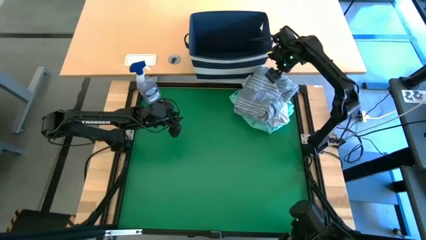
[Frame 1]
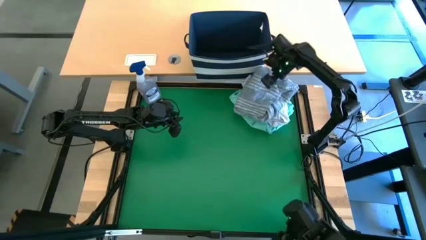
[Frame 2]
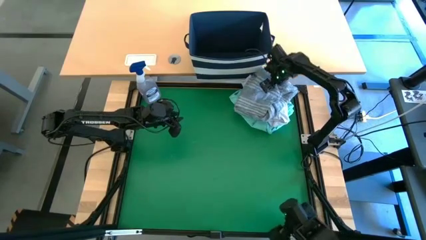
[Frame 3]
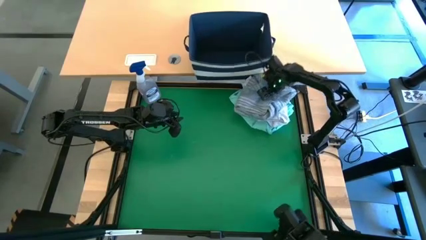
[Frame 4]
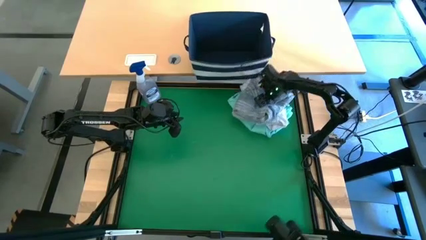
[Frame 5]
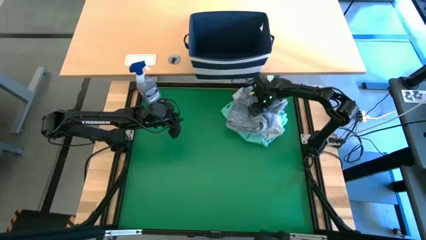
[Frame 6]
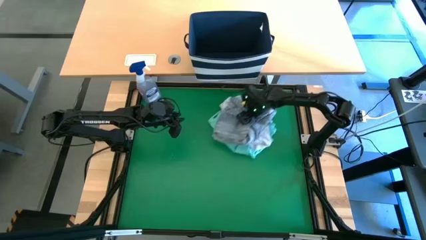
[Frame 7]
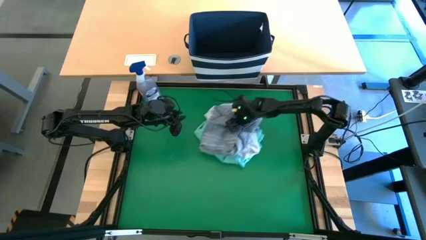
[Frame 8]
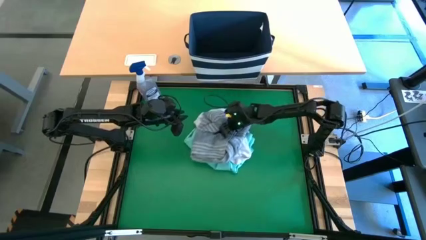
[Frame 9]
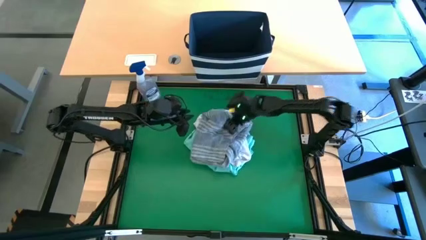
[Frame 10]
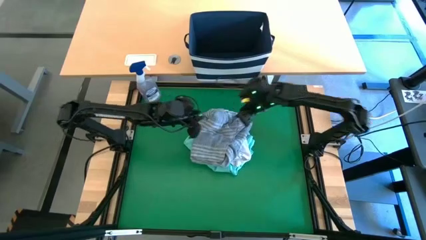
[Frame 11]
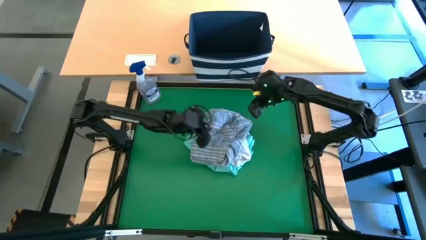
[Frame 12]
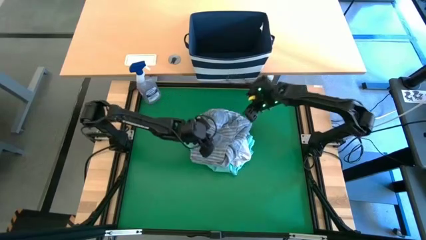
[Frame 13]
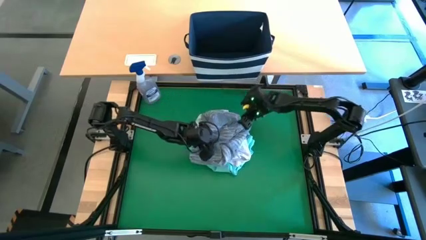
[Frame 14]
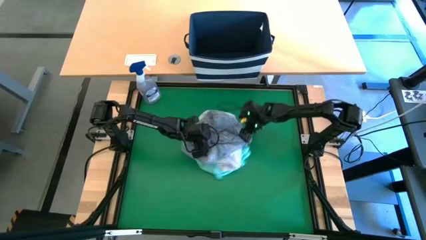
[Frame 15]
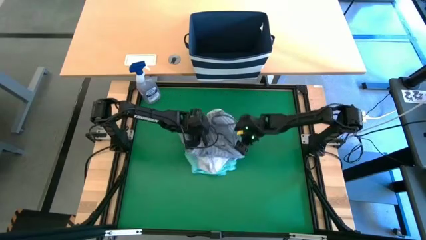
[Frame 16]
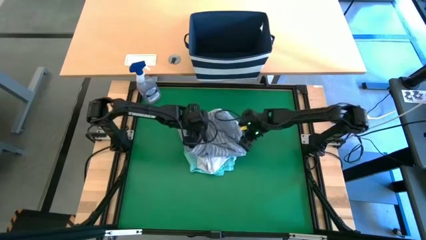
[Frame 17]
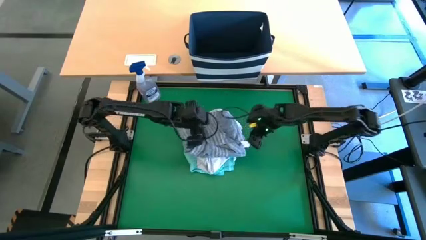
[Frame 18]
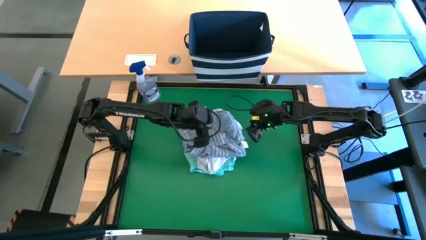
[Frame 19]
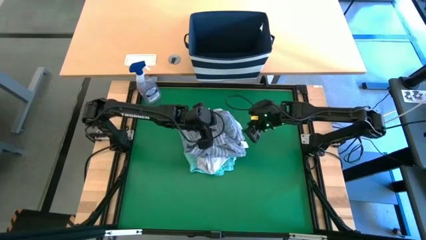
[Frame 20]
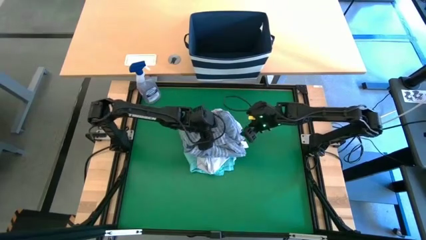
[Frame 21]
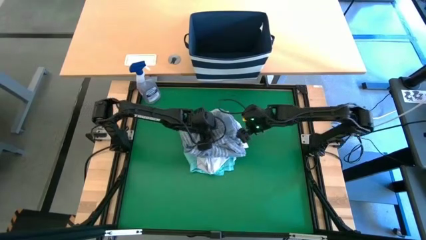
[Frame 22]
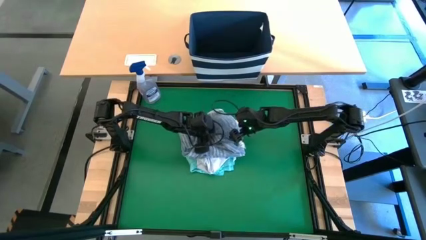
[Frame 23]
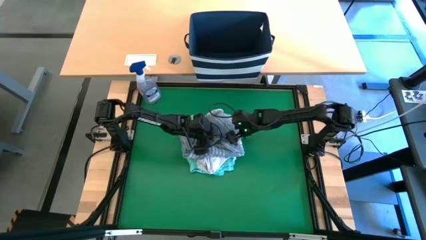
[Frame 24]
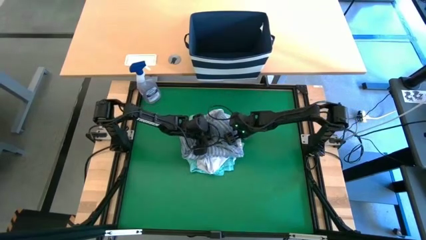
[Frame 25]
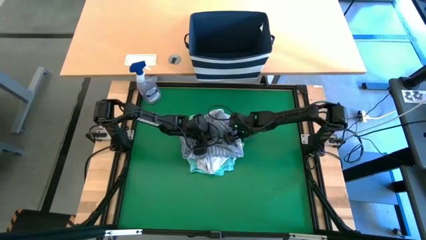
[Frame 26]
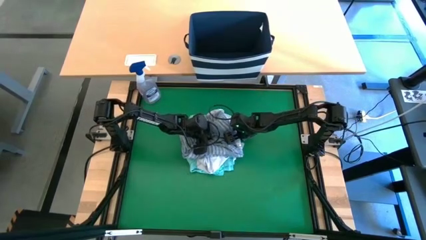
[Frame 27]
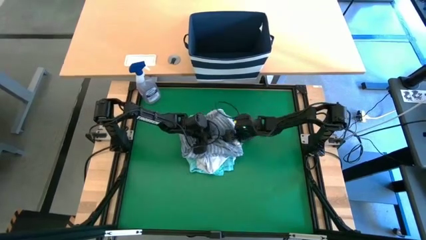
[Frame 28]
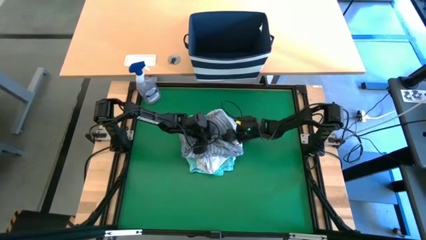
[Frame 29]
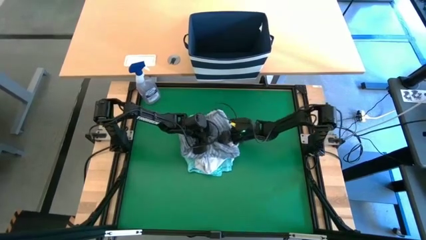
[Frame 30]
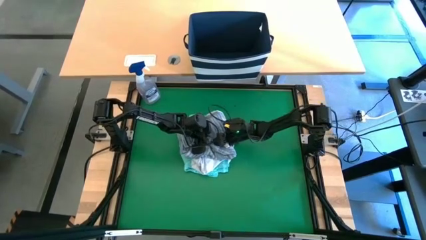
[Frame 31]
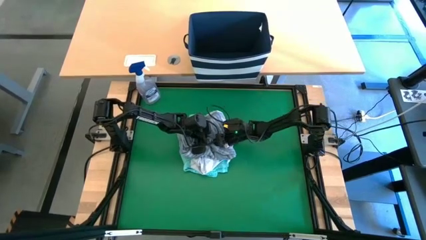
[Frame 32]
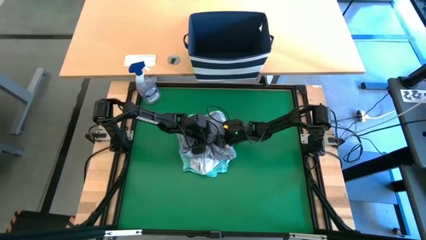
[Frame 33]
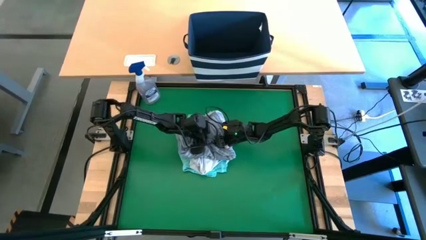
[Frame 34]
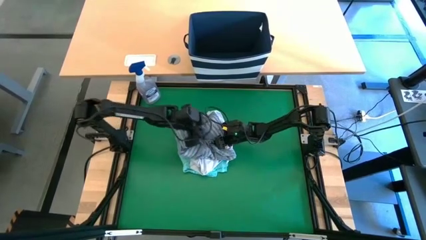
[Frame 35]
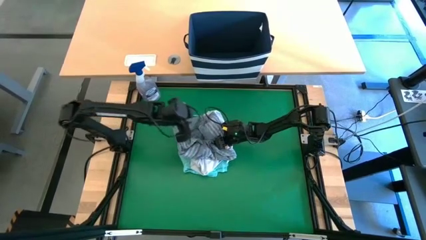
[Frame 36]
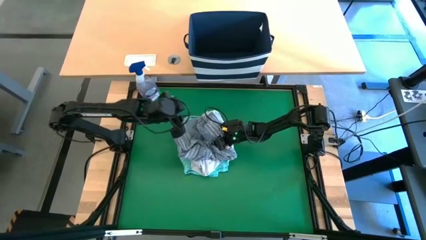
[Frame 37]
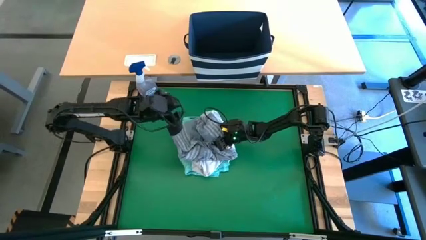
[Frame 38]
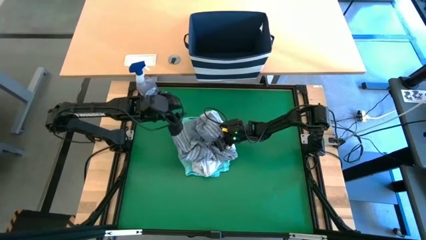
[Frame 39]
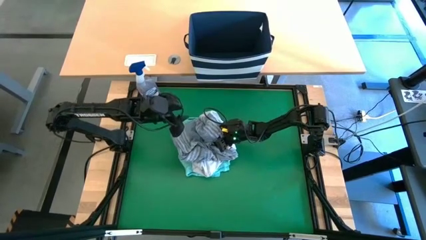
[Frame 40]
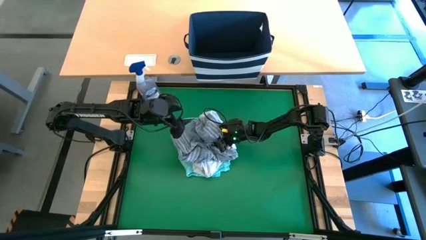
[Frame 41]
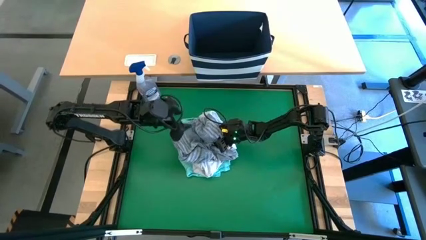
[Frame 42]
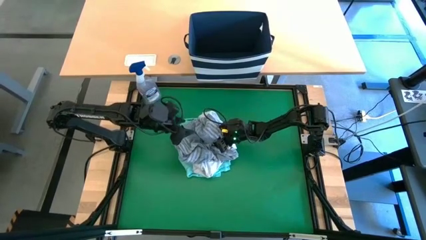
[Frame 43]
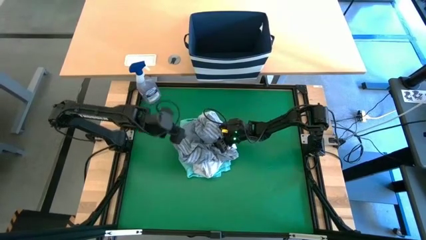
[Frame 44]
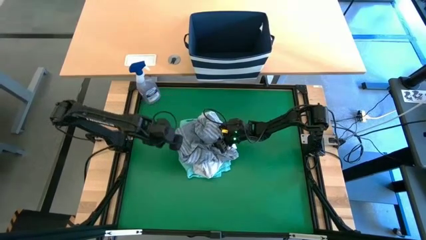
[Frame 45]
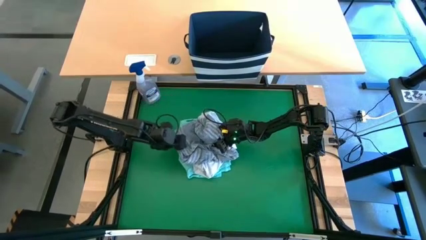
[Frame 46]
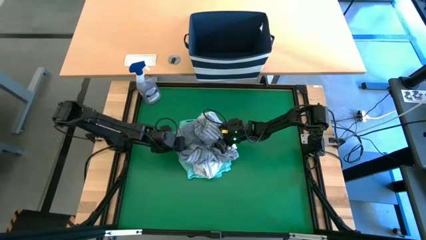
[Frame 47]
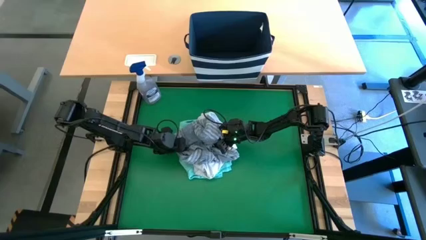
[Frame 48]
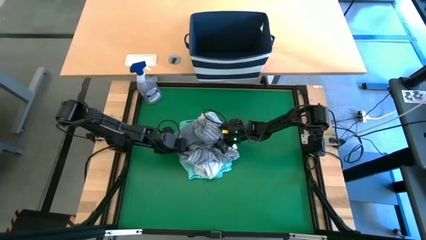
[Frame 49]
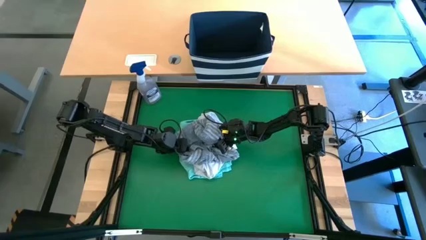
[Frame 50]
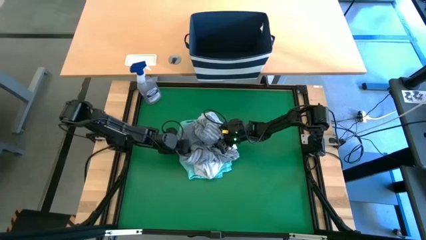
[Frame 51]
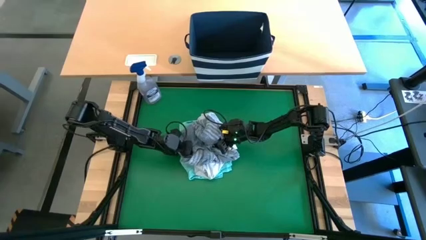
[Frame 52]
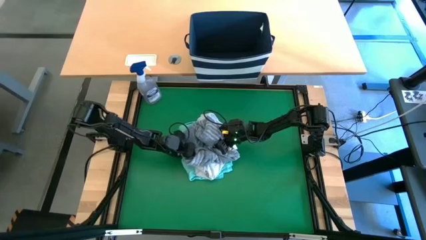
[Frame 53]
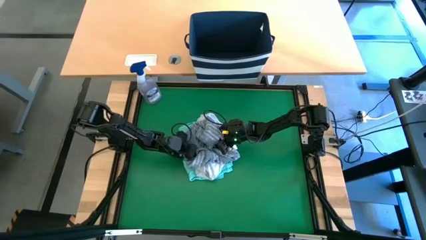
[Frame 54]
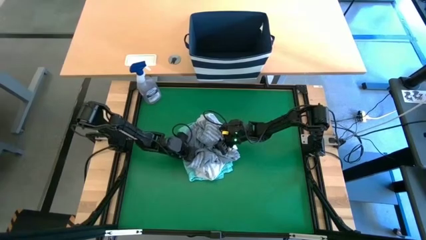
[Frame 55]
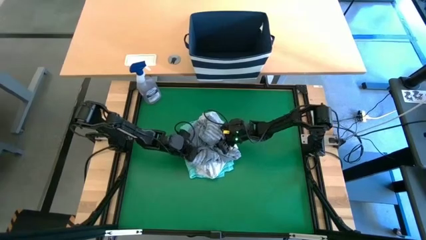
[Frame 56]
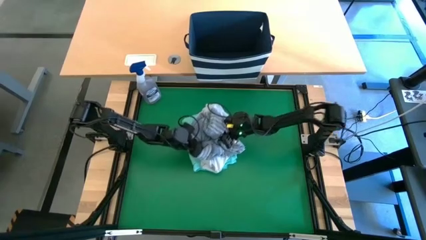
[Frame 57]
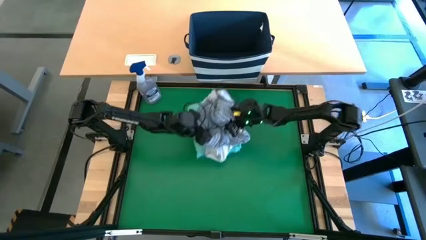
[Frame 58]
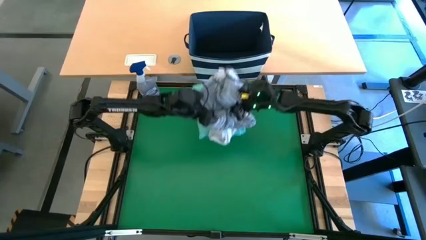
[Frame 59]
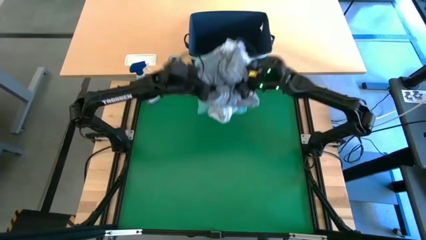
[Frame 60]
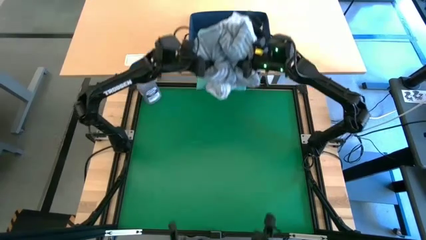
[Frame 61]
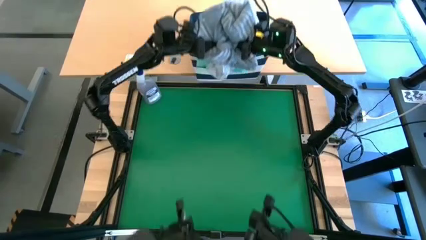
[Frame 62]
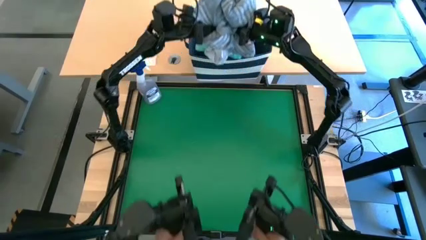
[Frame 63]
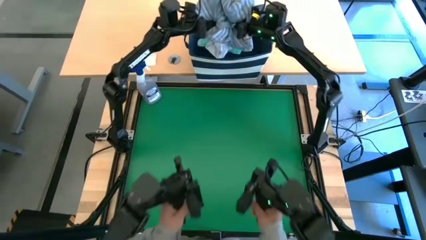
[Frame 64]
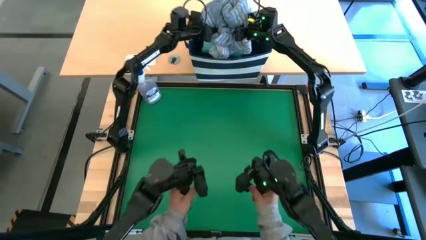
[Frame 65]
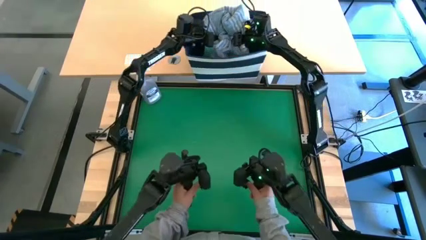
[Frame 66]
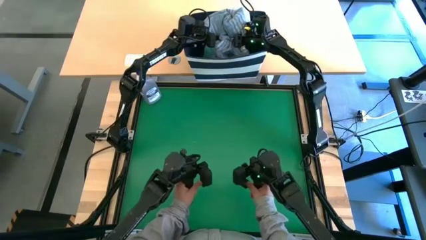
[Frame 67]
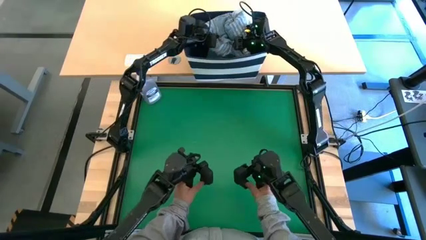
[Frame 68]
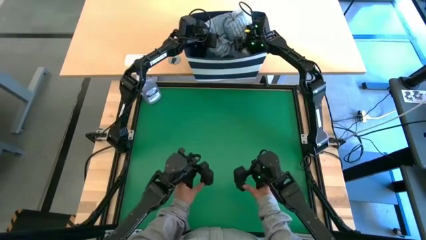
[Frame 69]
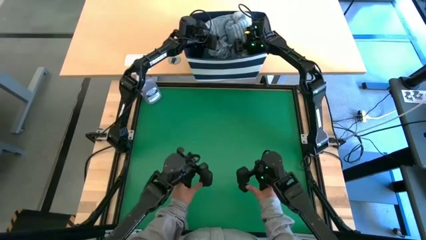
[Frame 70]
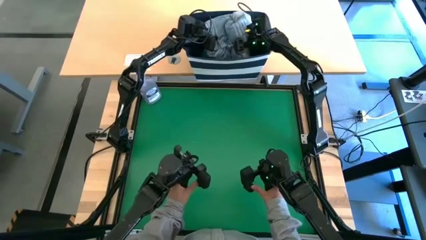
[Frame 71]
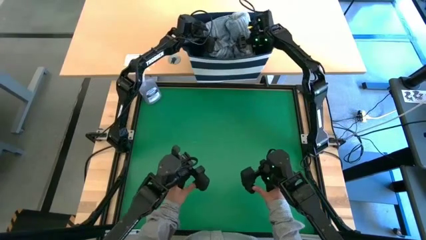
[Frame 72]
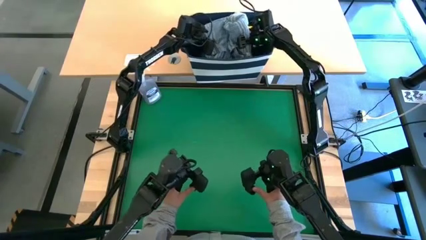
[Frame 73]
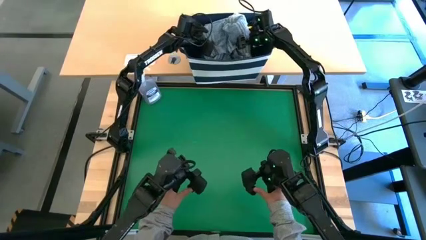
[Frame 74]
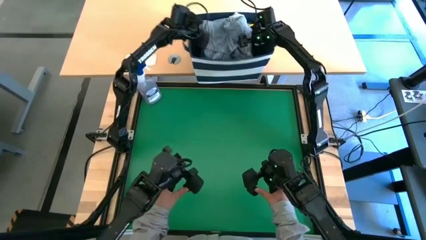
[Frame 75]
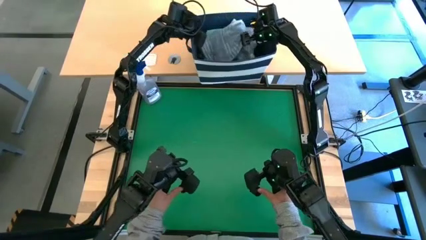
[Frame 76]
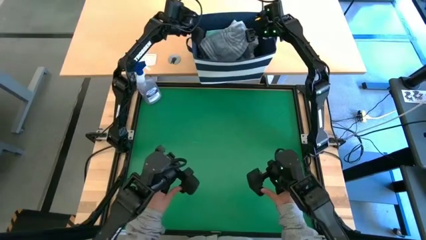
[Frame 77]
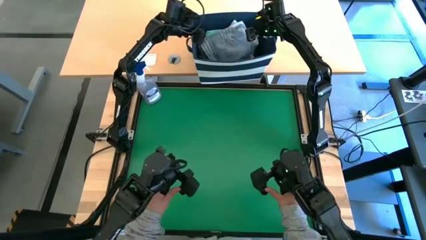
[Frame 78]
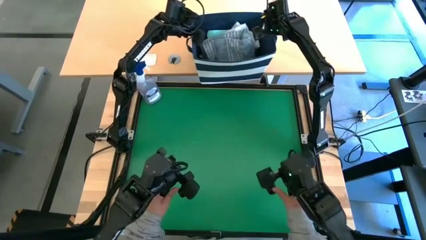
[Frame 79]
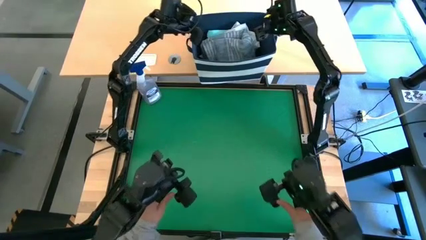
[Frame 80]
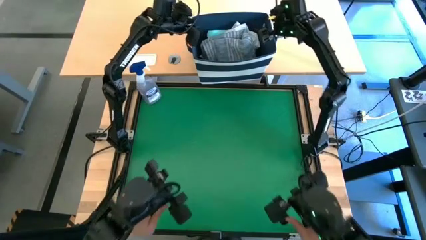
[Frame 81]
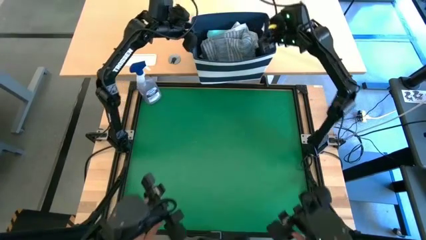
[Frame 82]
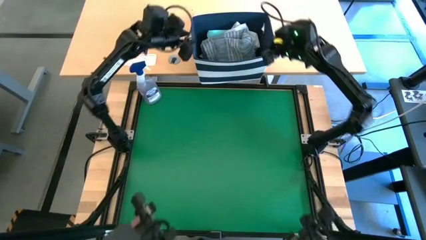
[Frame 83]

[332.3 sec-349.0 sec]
Task: Fold laundry
Put the stacked clothes into the blue laundry bin
